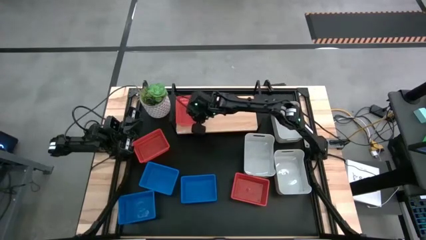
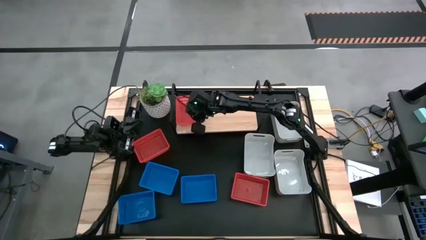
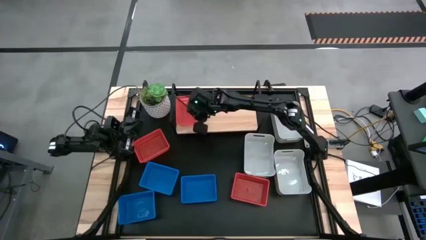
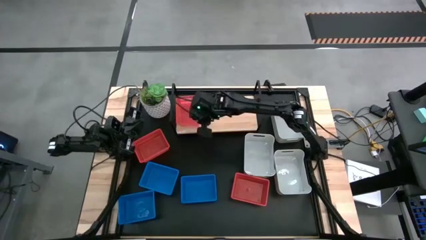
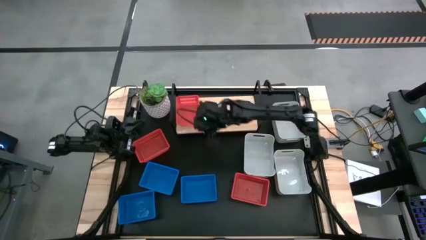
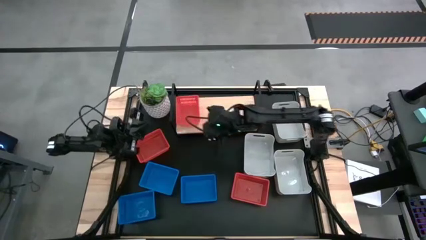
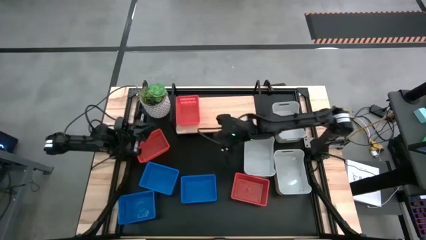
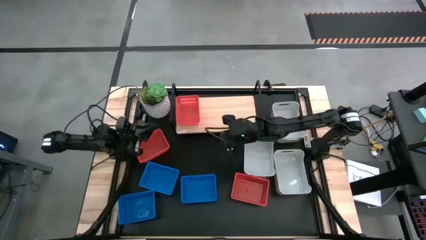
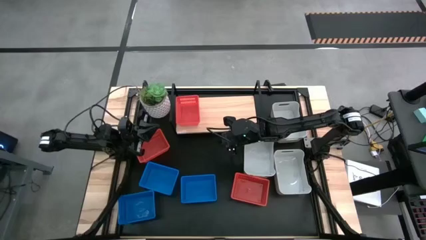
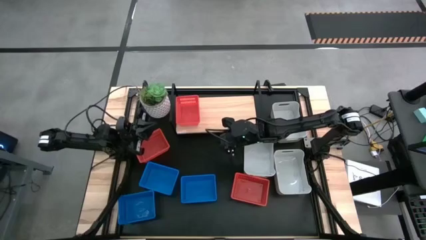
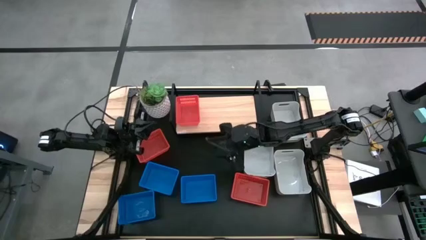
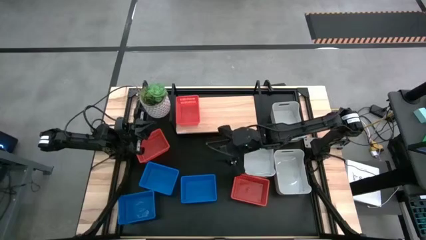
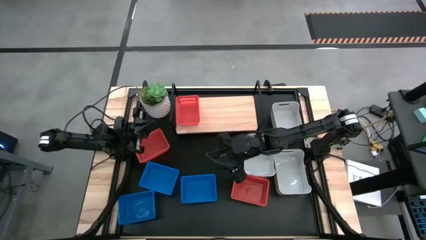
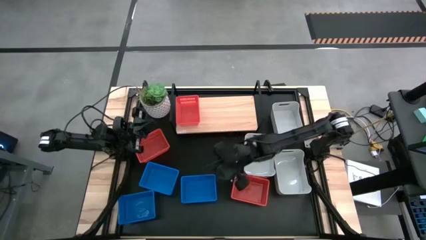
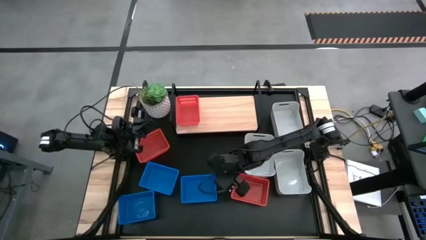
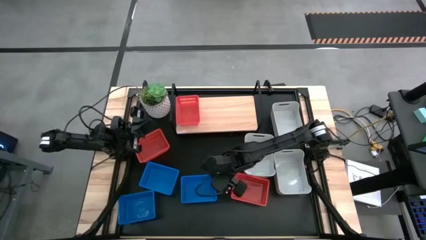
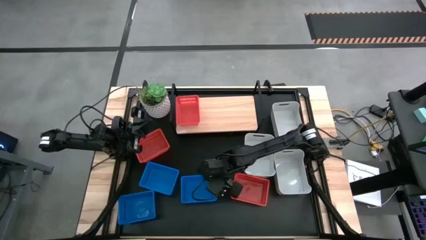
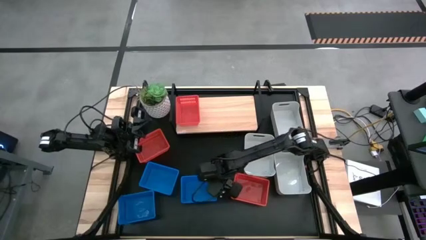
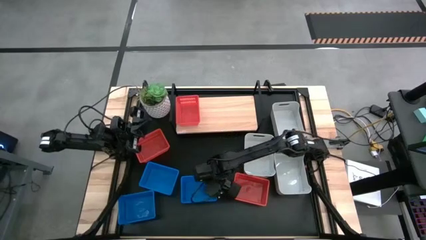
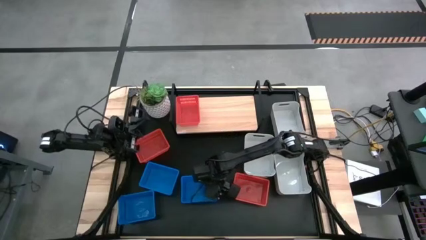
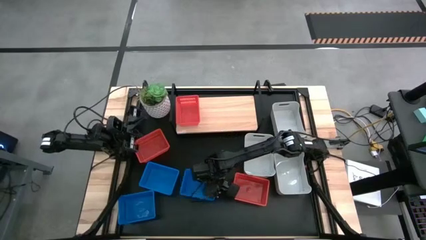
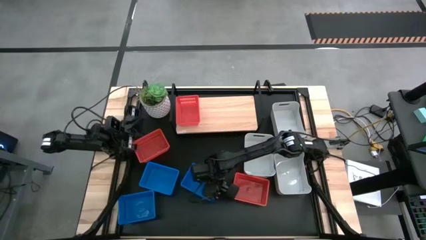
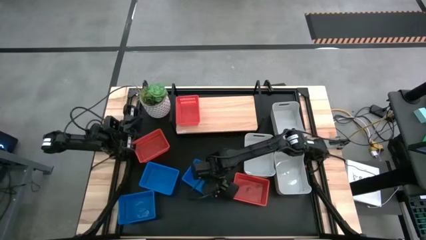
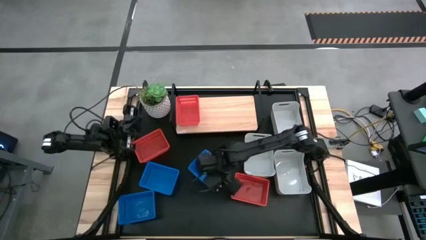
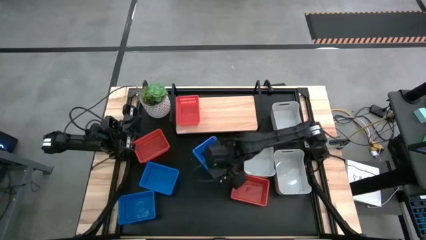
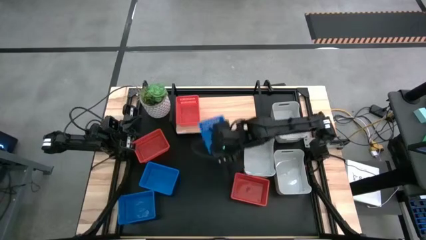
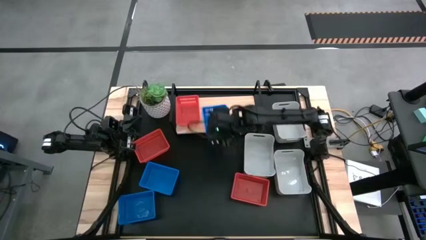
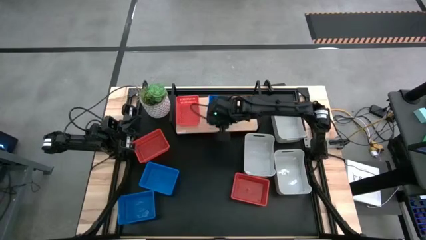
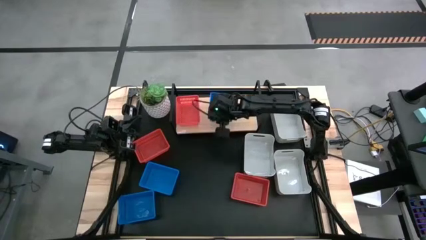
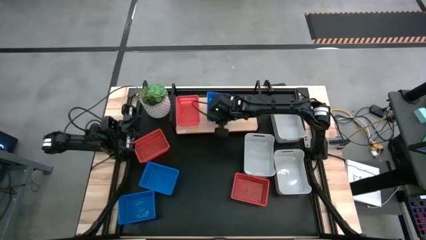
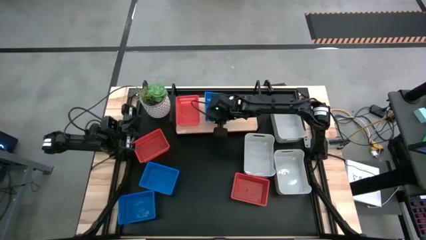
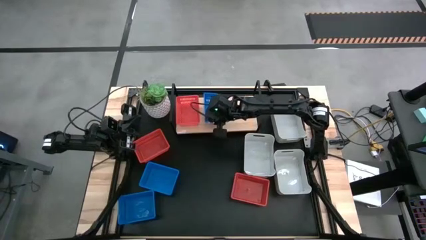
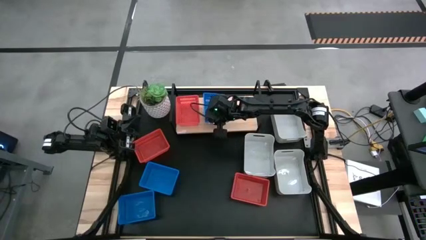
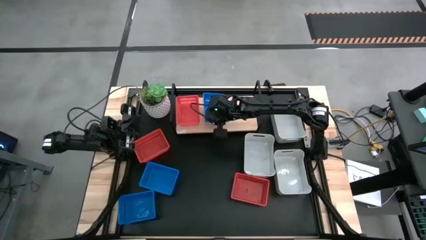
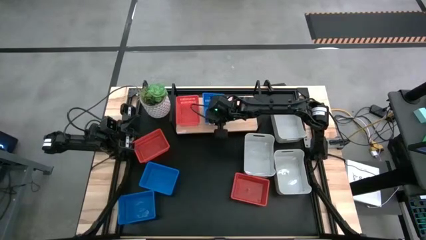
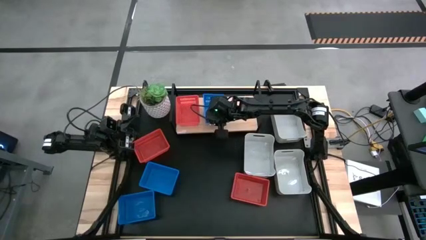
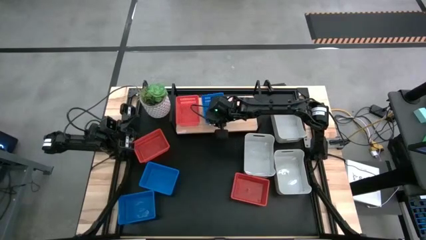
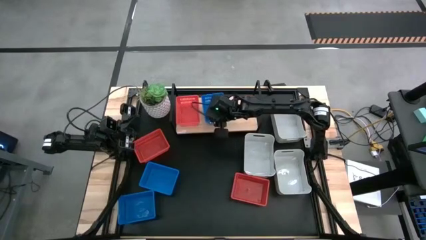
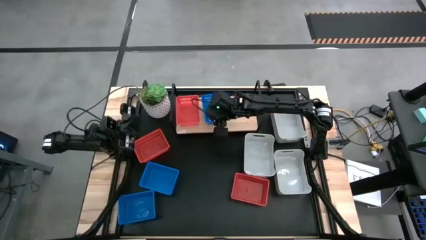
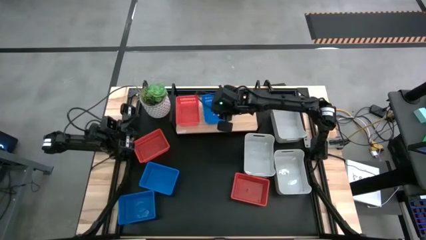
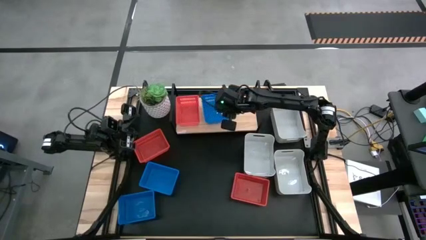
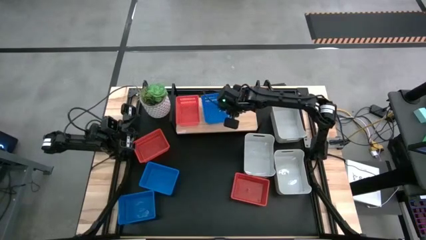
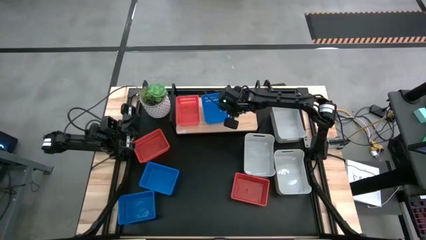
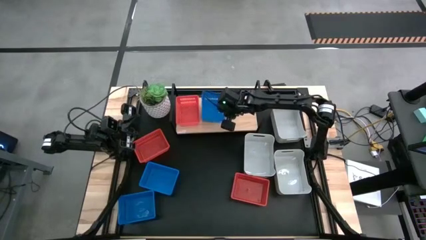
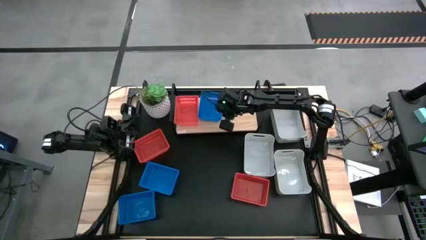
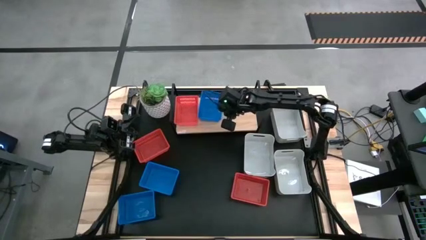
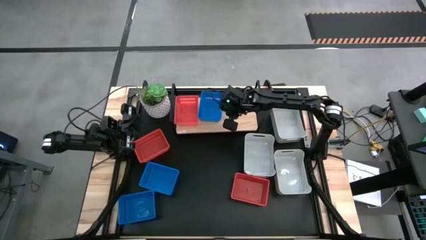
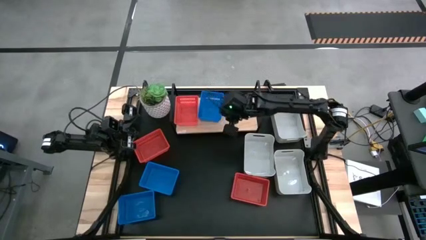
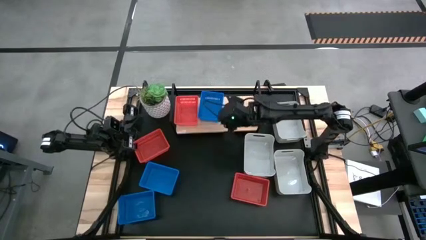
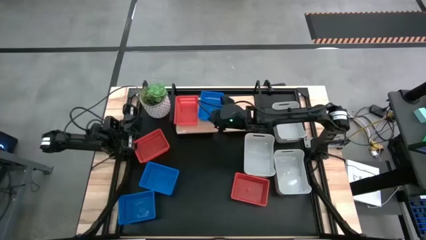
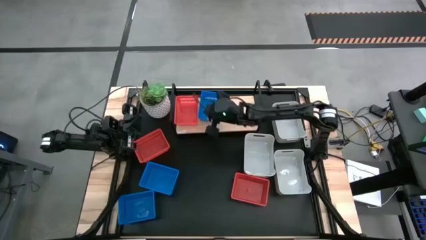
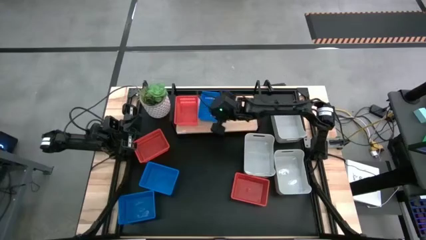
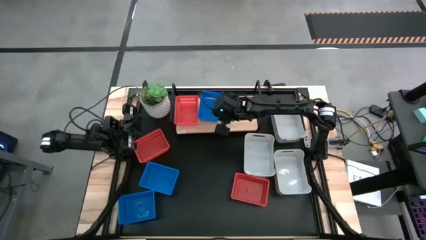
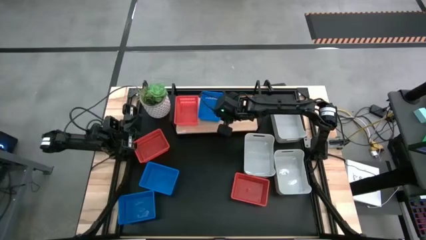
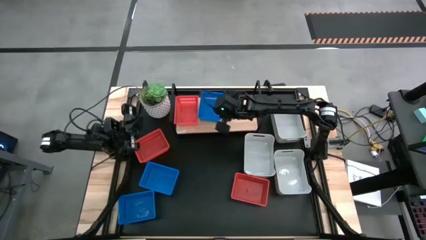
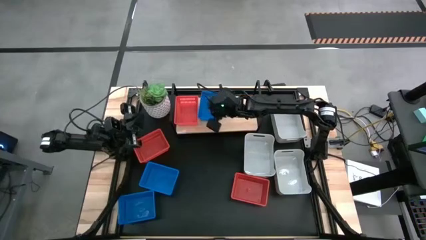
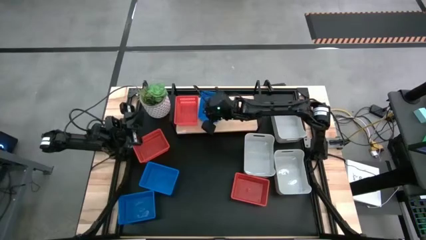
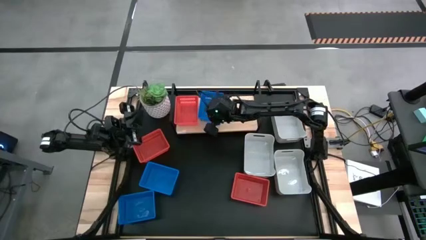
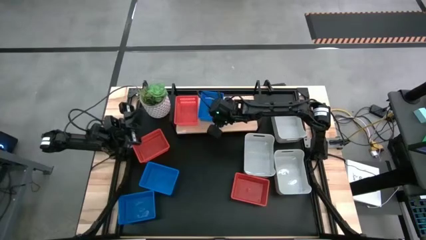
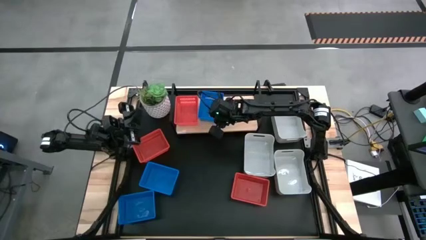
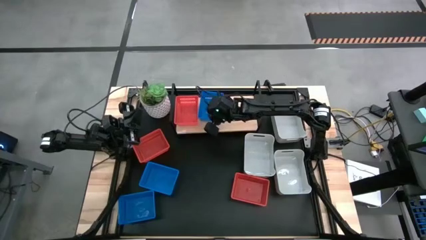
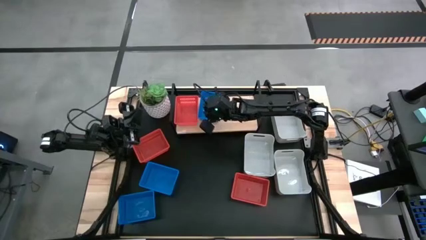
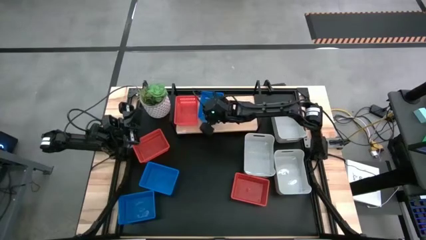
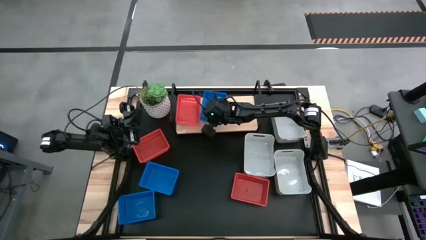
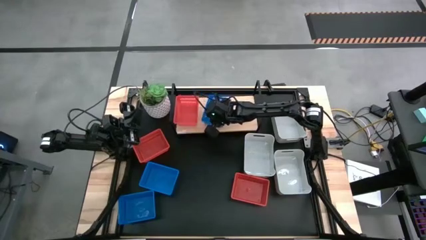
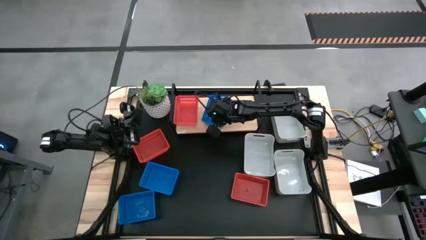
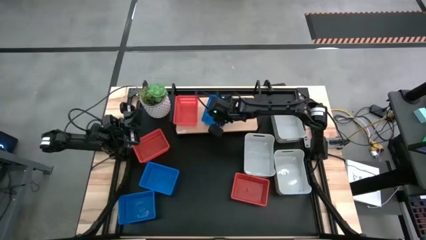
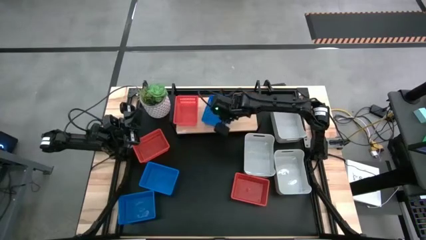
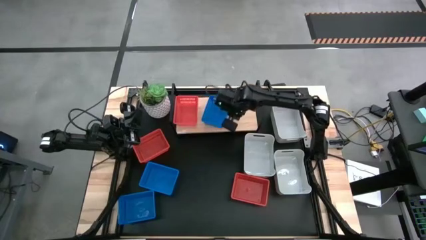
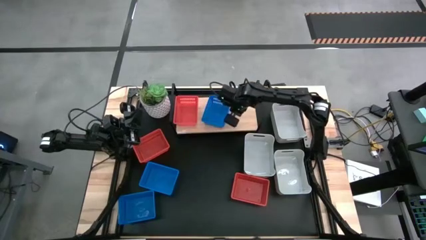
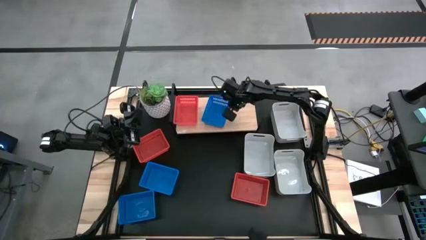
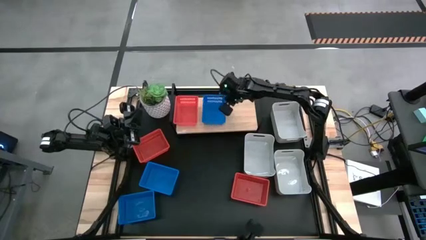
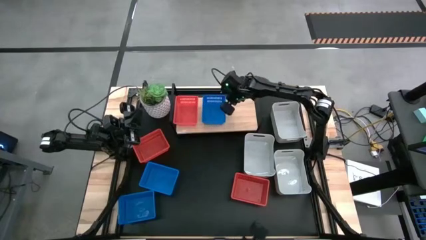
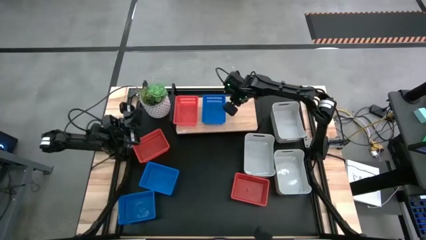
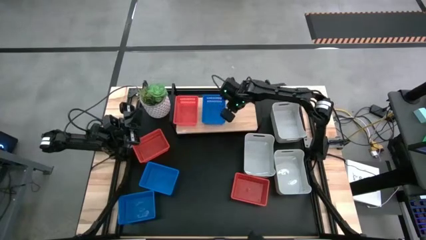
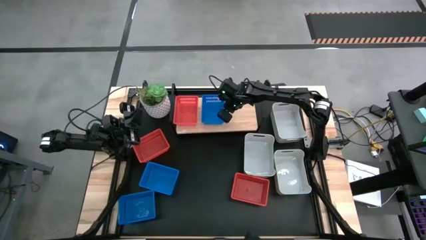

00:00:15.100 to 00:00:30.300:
Put the top right blue basket on the shelf
